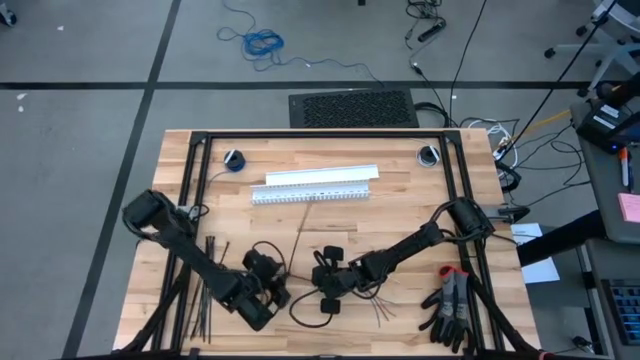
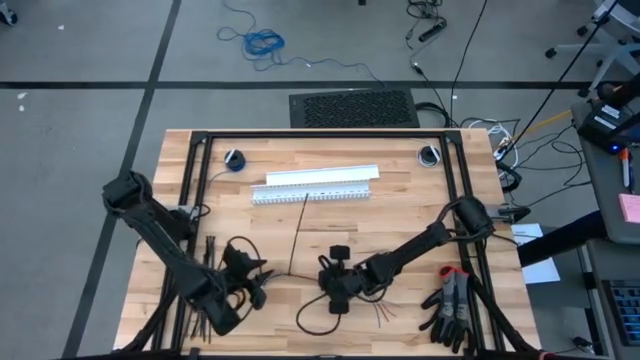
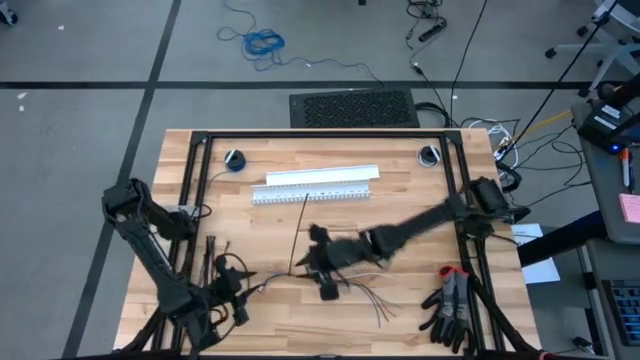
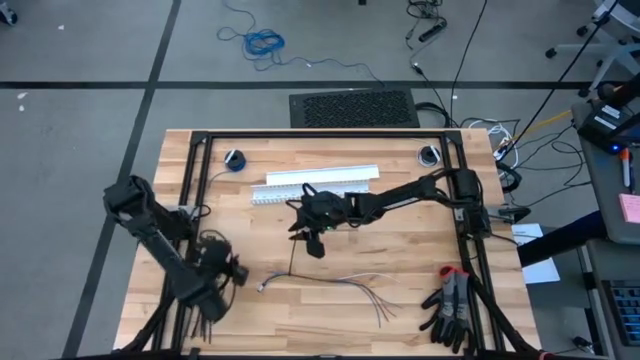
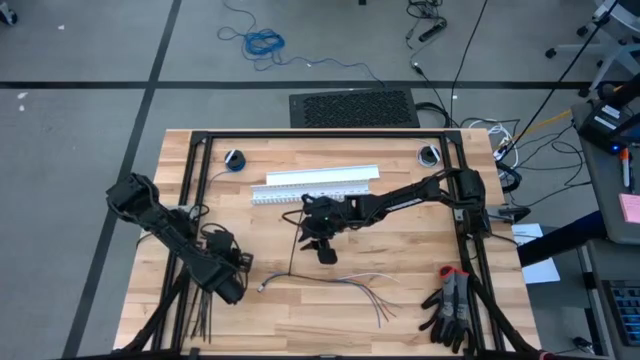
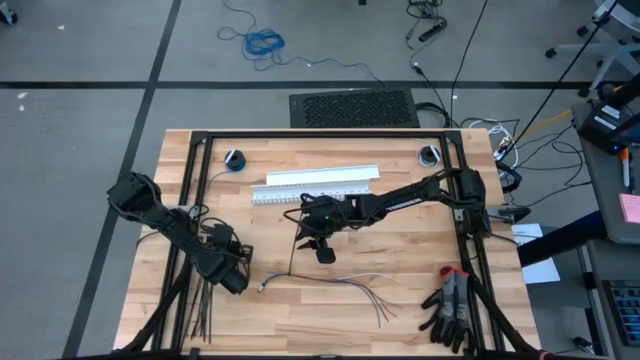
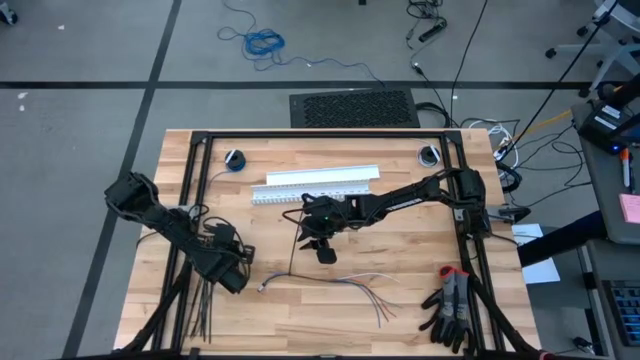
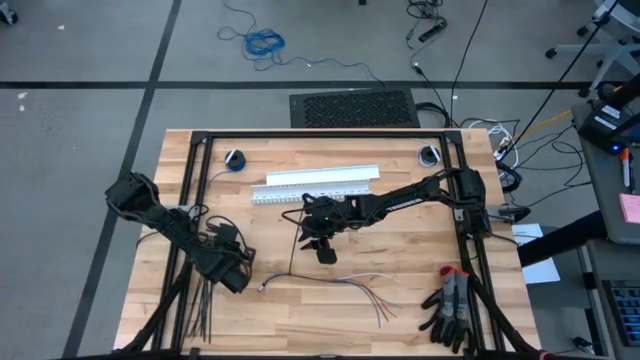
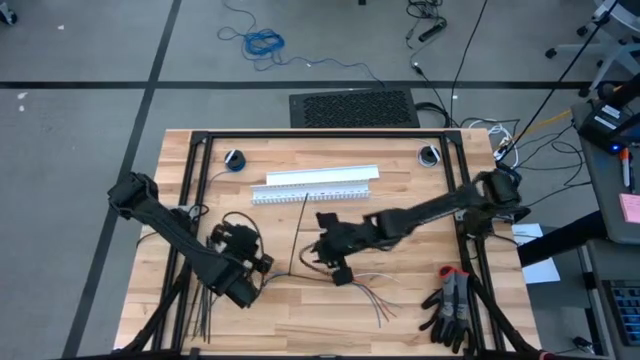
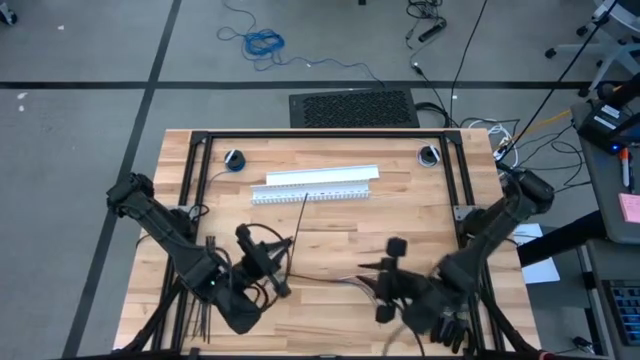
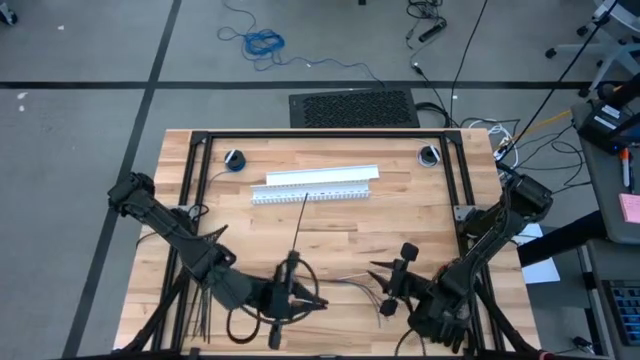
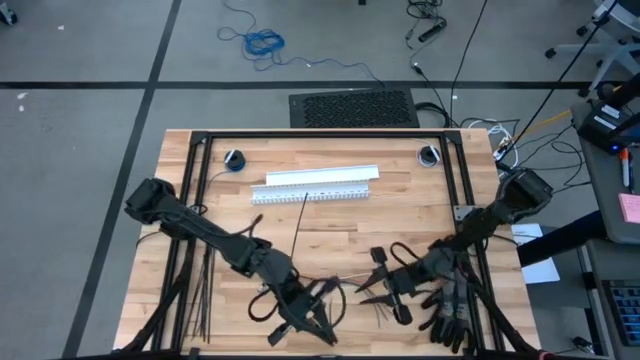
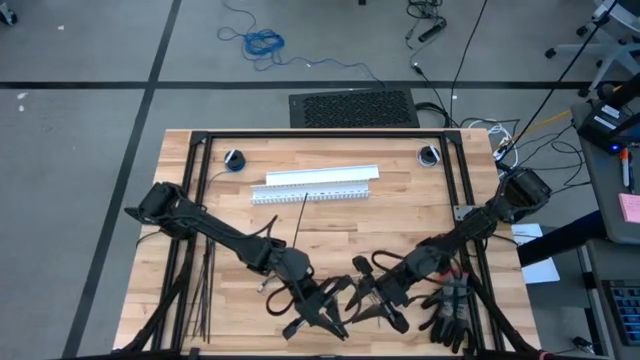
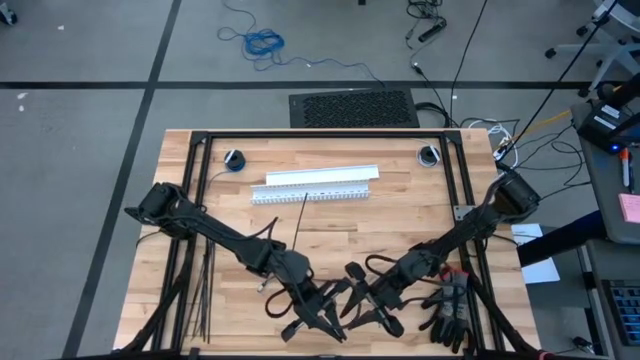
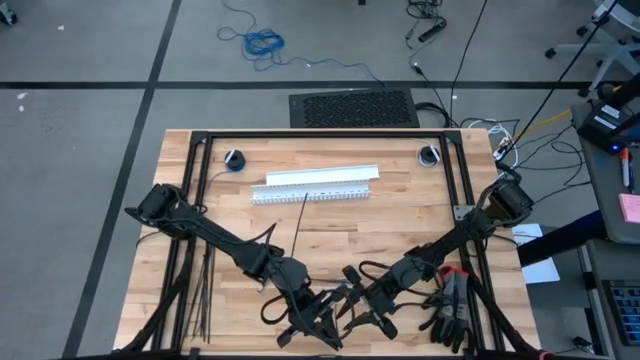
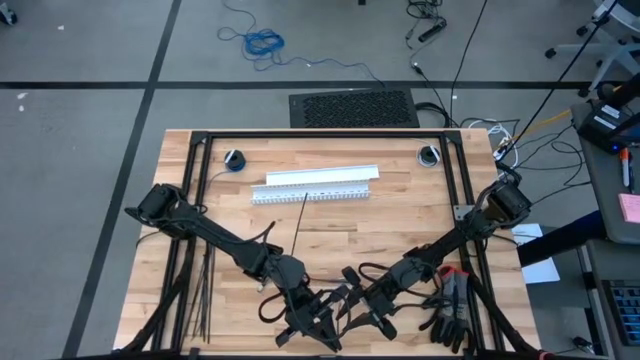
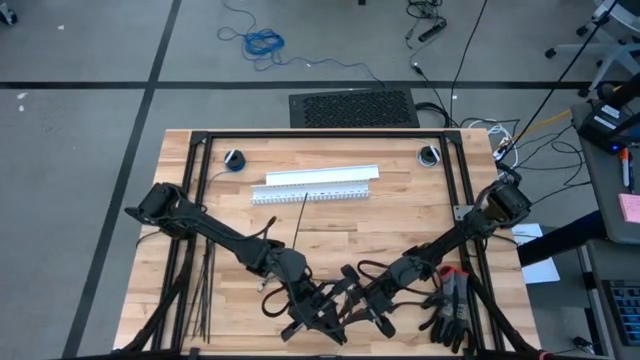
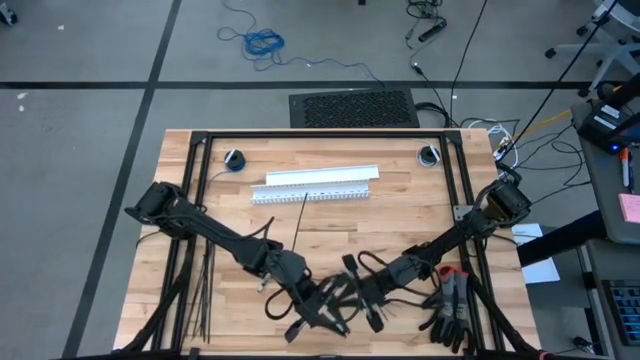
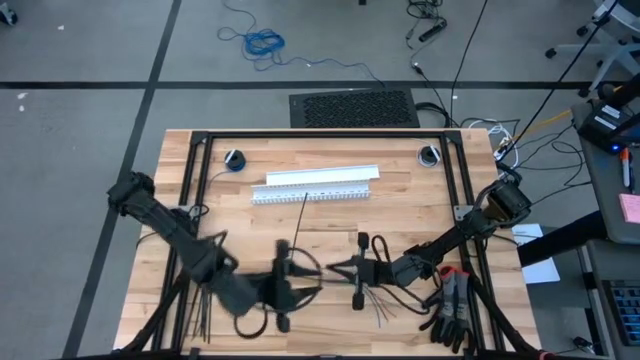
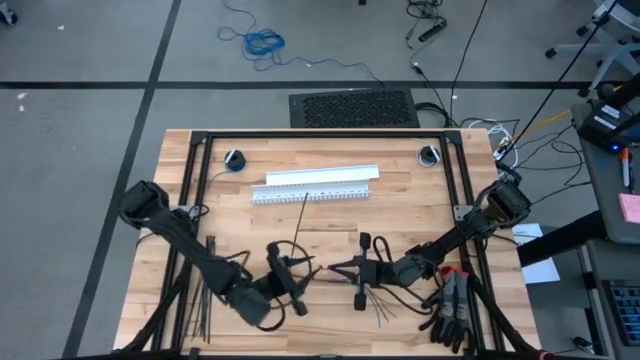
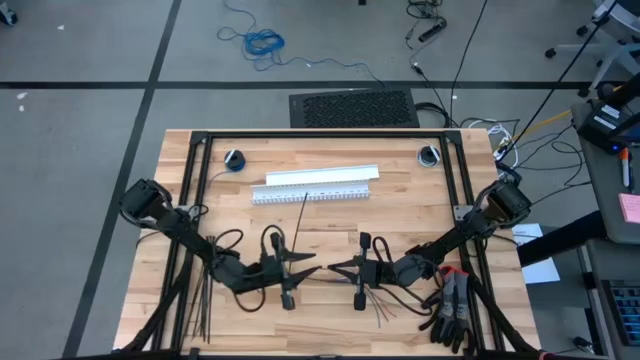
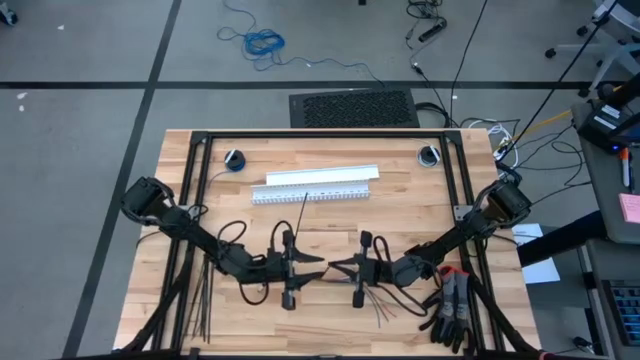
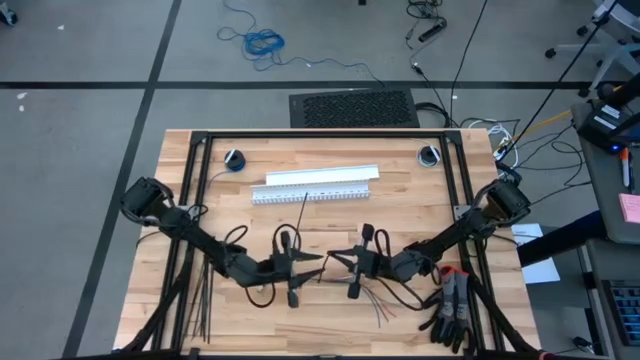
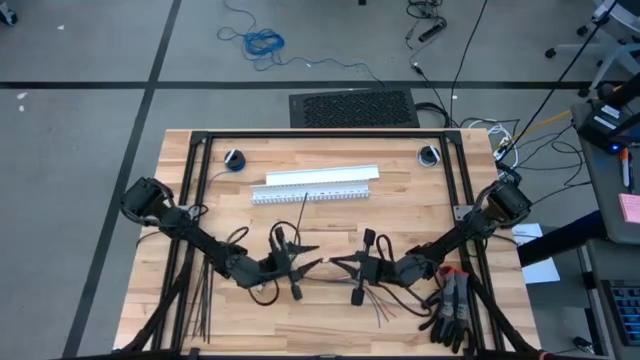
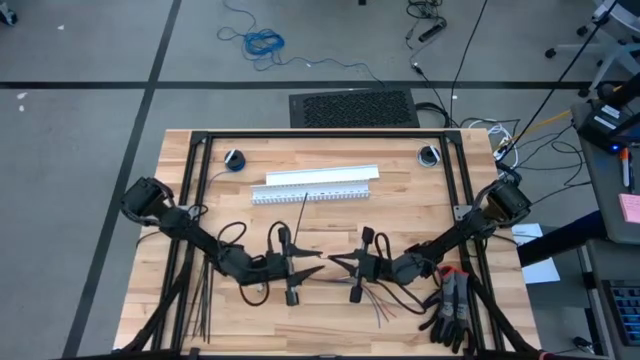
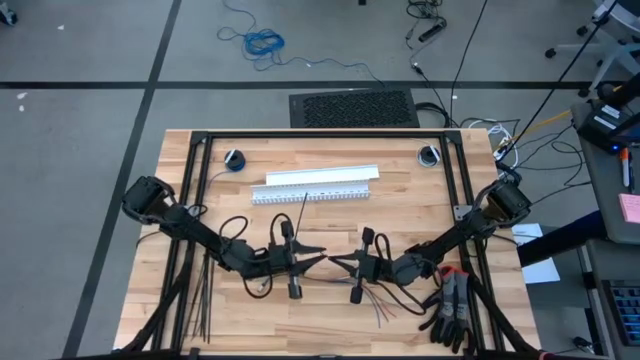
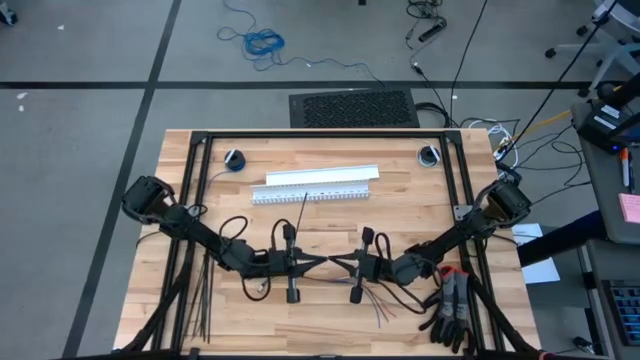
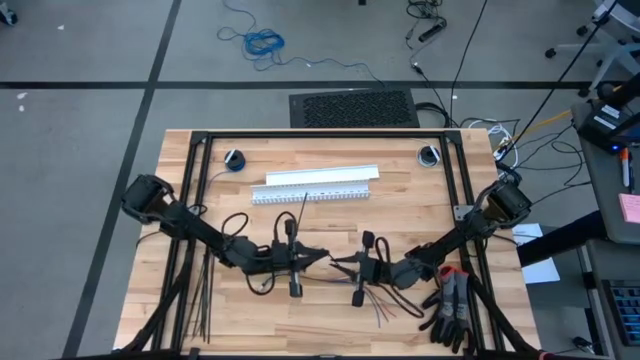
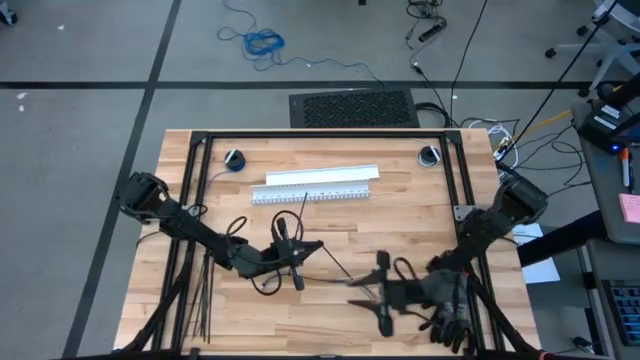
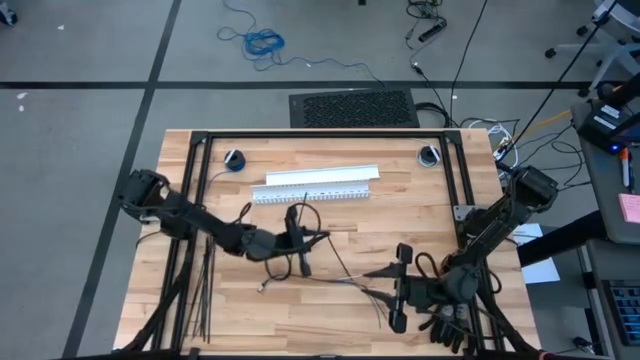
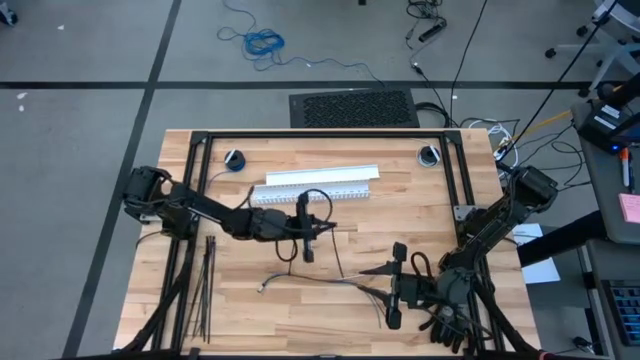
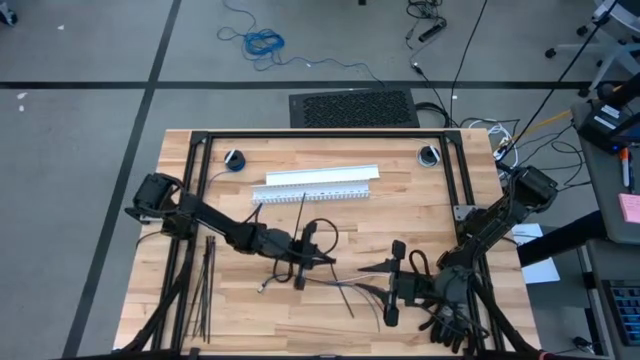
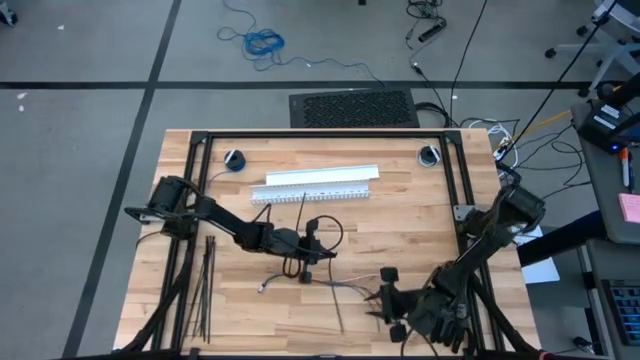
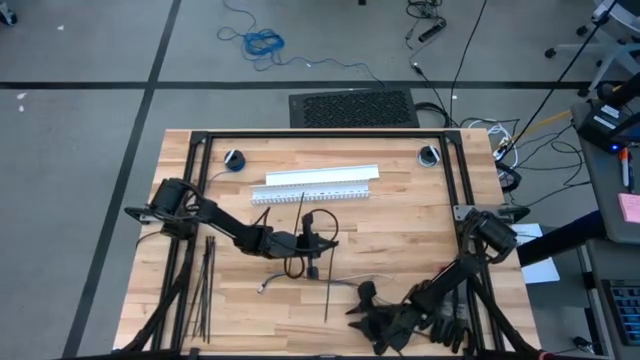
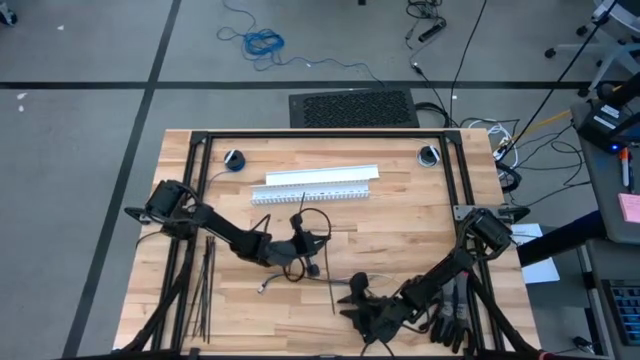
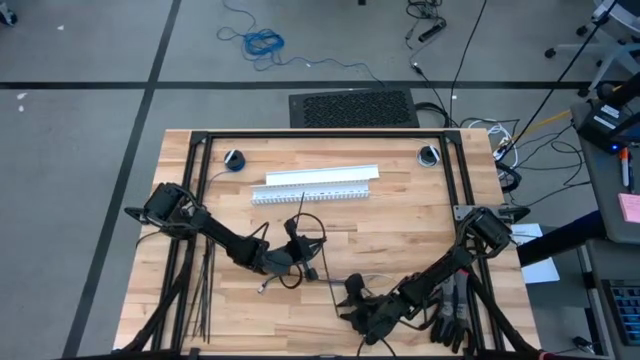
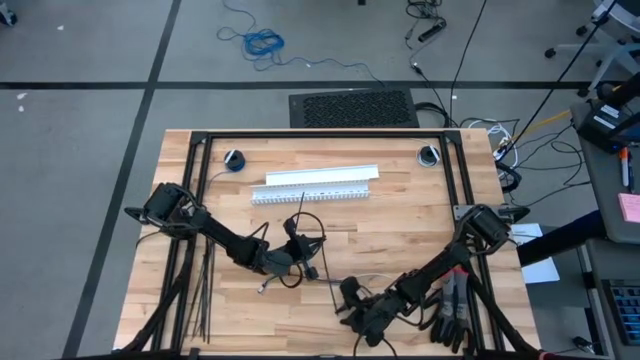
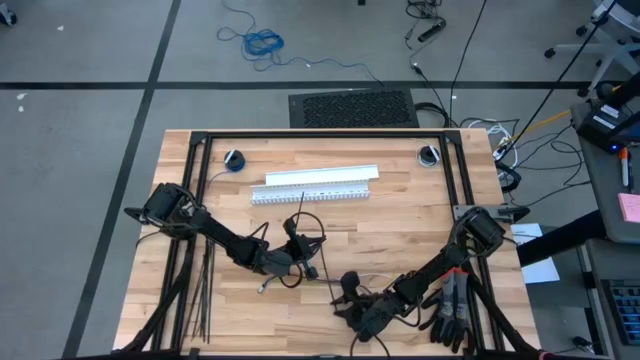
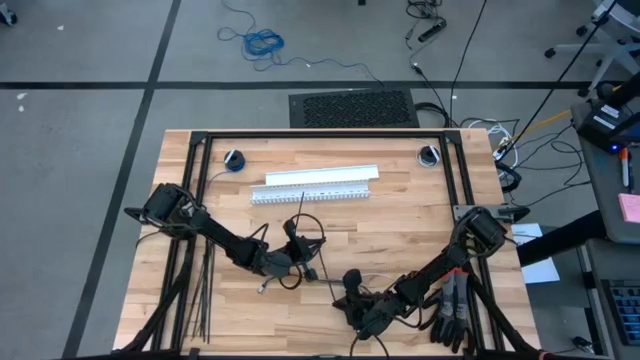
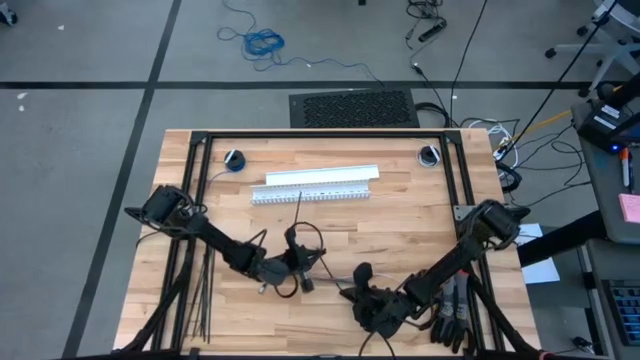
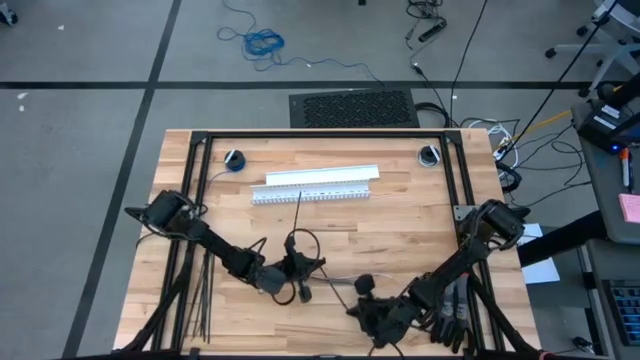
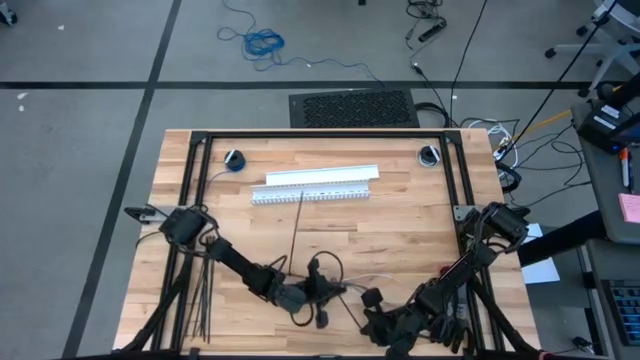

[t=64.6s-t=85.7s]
Task: Ziptie cables
Wrap the black zip tie on the cables

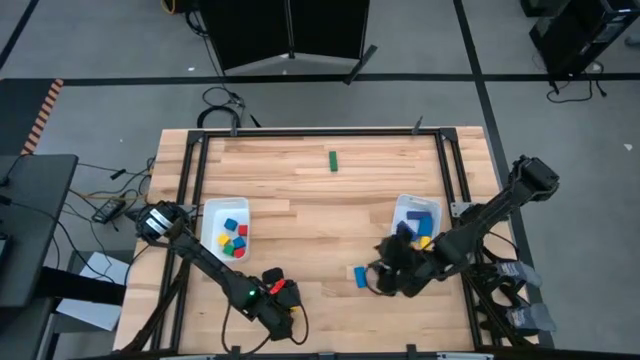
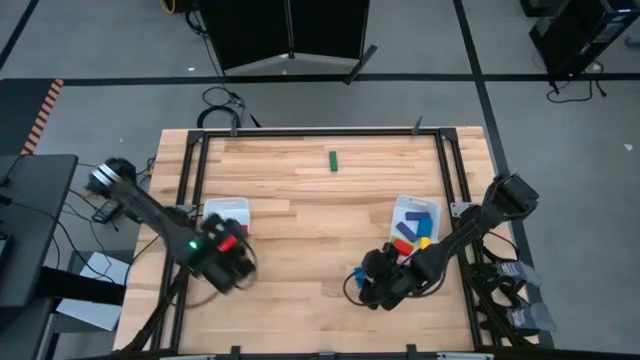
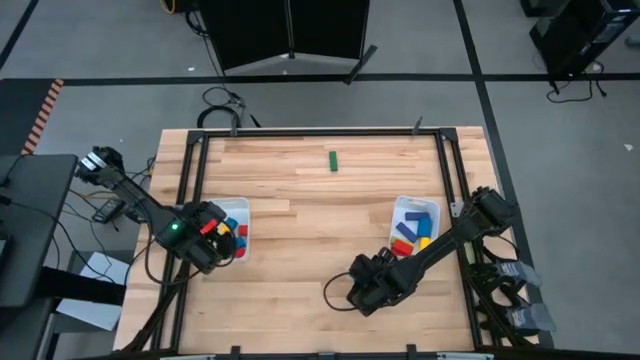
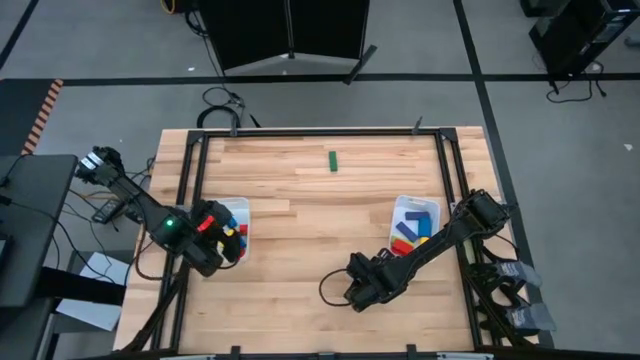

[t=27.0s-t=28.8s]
Task: Sort blocks by size
Put the yellow game piece into the left bin
